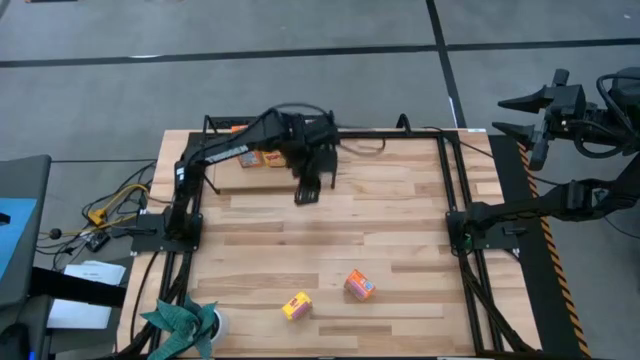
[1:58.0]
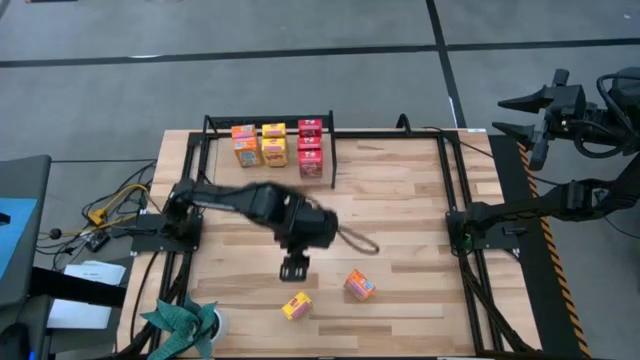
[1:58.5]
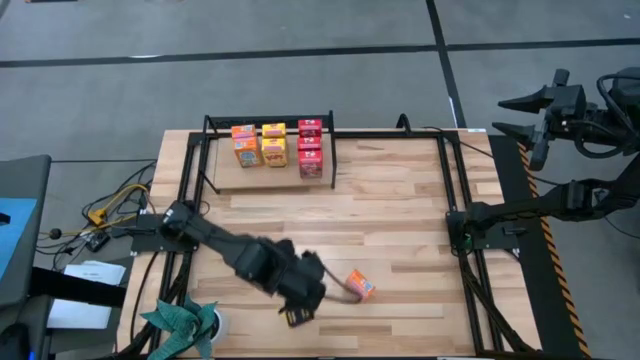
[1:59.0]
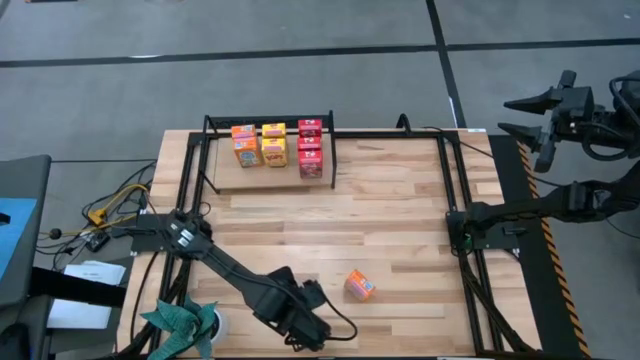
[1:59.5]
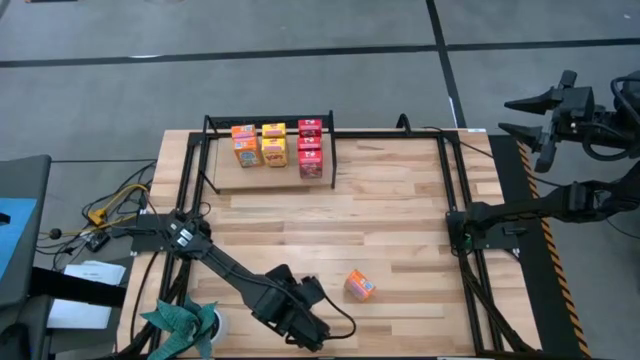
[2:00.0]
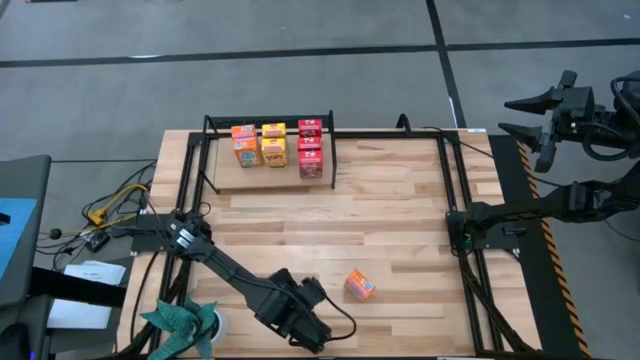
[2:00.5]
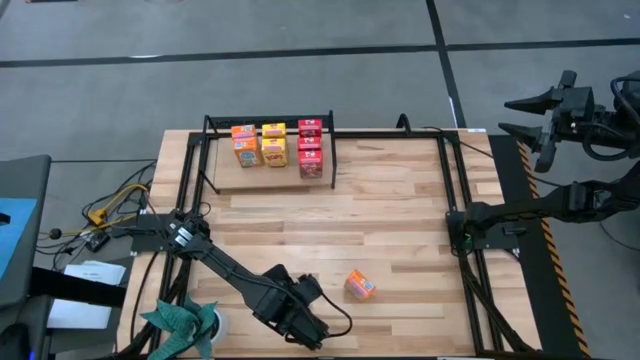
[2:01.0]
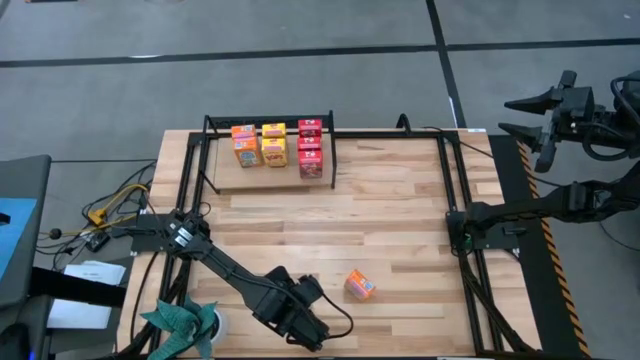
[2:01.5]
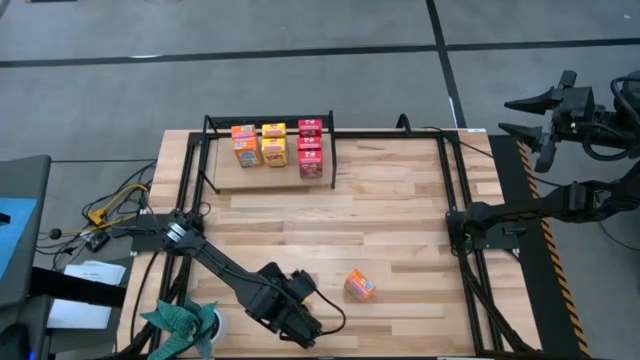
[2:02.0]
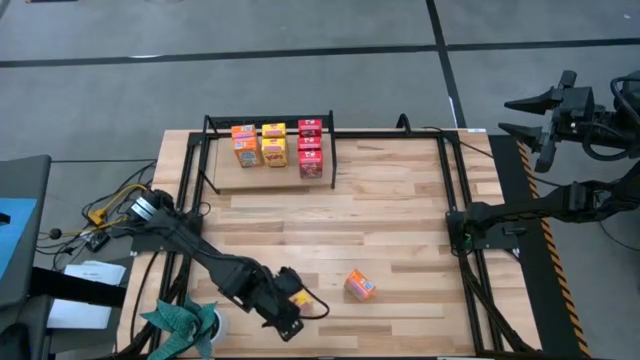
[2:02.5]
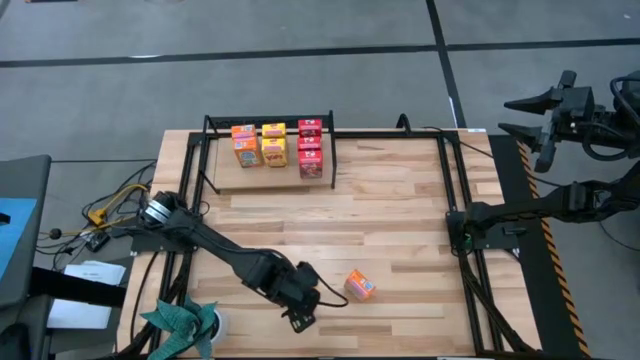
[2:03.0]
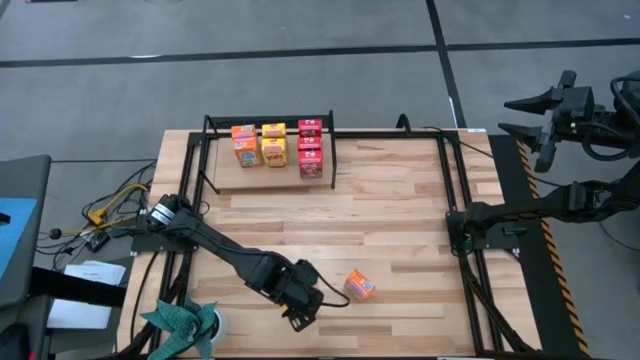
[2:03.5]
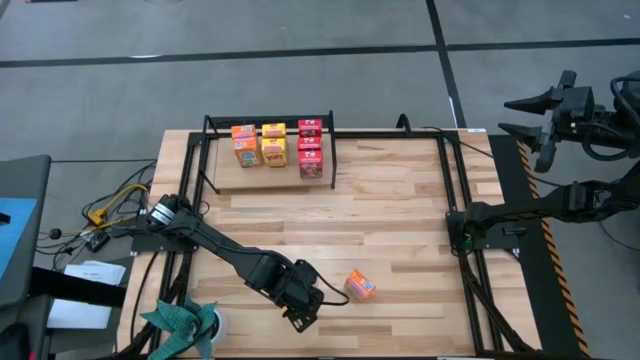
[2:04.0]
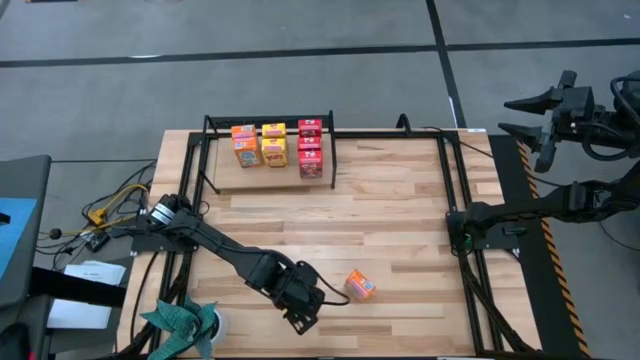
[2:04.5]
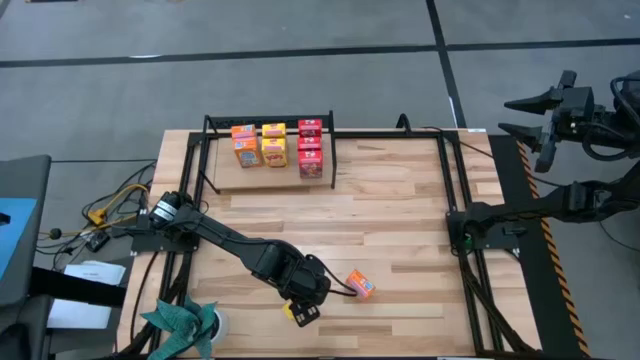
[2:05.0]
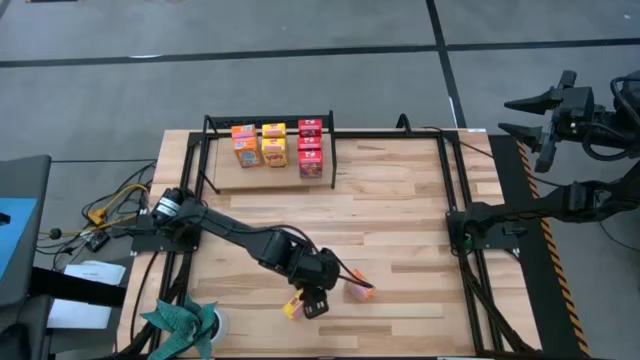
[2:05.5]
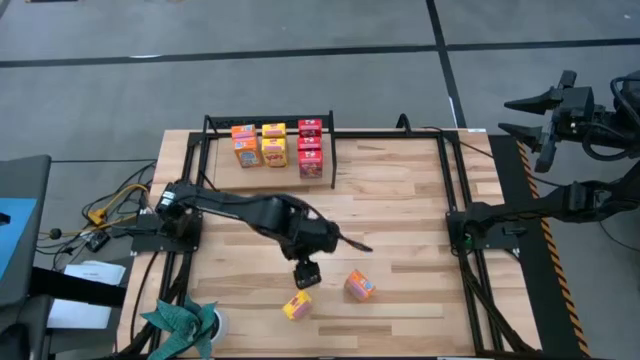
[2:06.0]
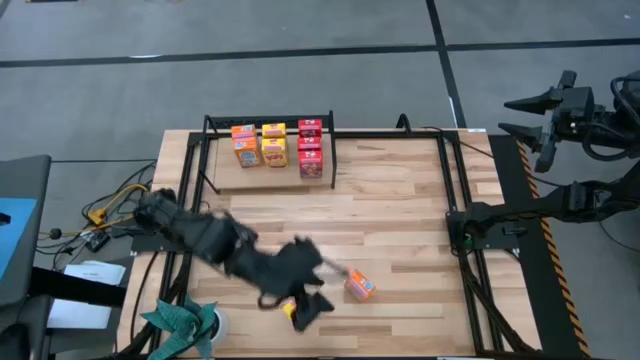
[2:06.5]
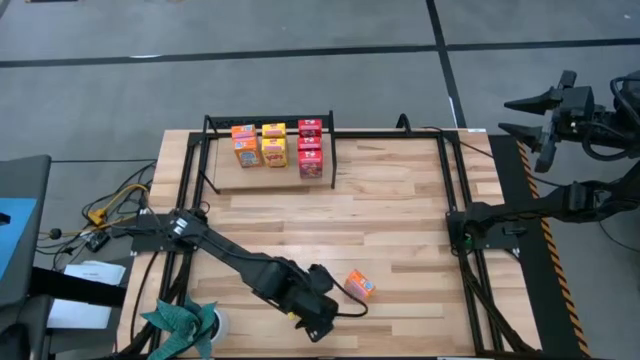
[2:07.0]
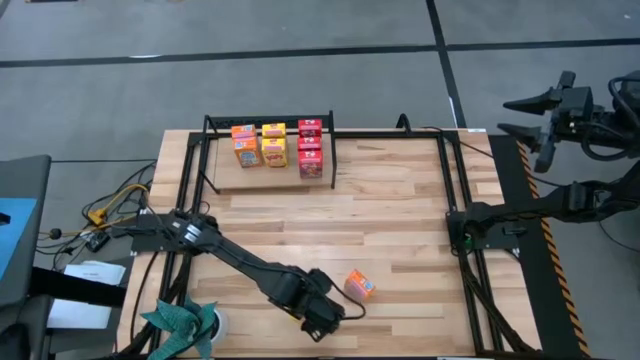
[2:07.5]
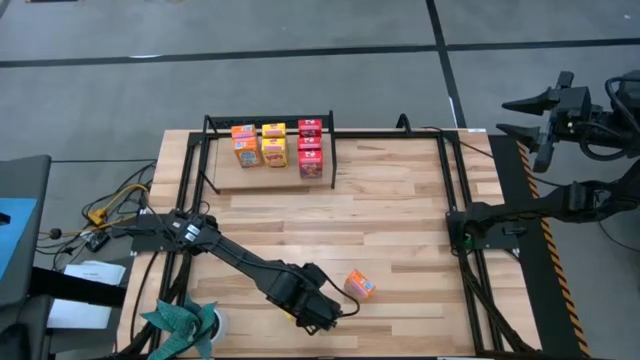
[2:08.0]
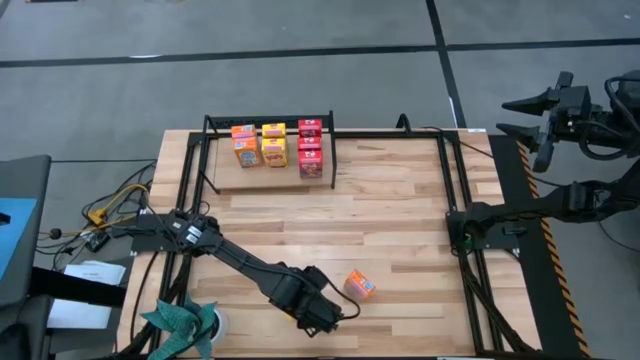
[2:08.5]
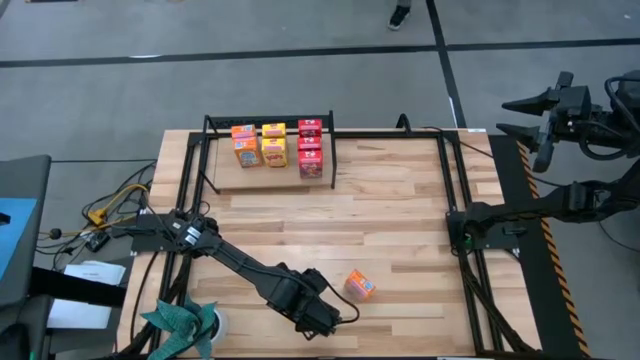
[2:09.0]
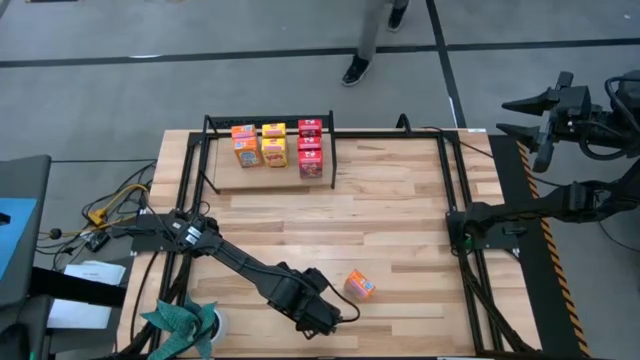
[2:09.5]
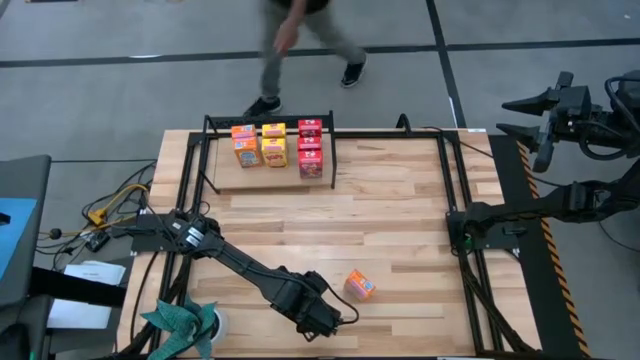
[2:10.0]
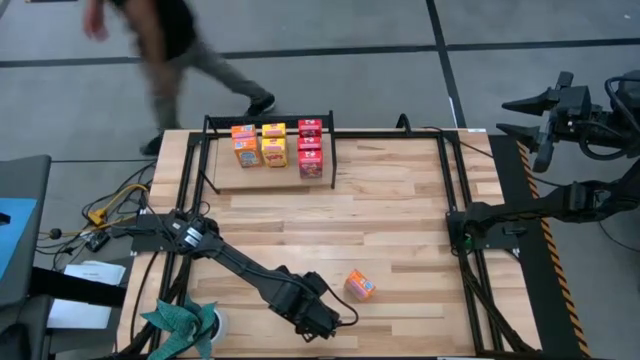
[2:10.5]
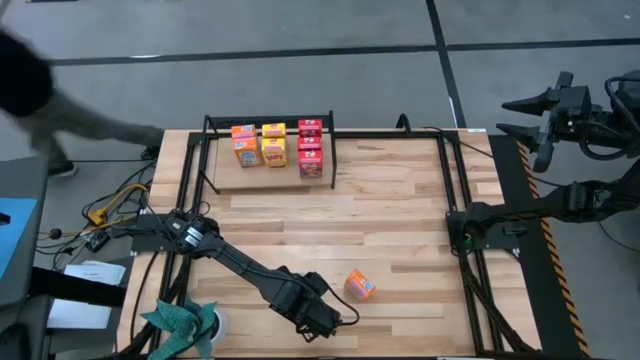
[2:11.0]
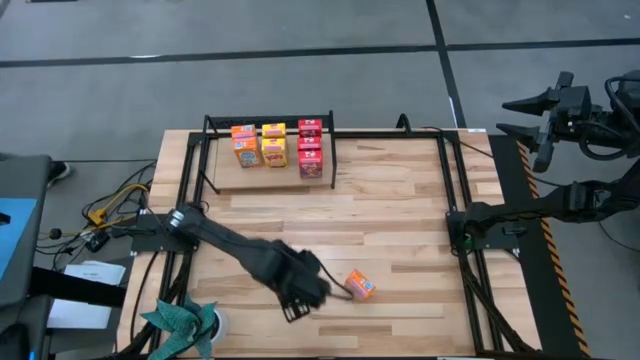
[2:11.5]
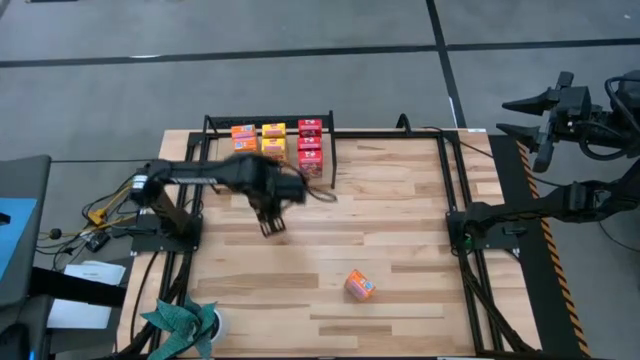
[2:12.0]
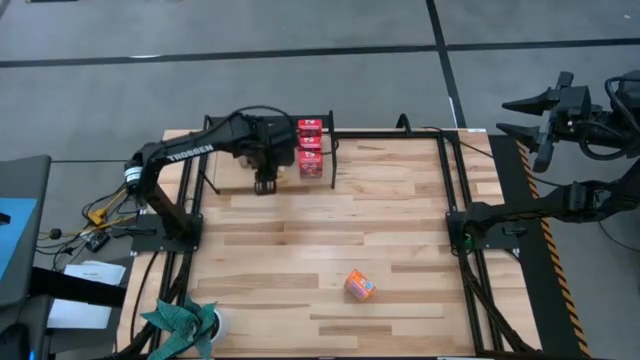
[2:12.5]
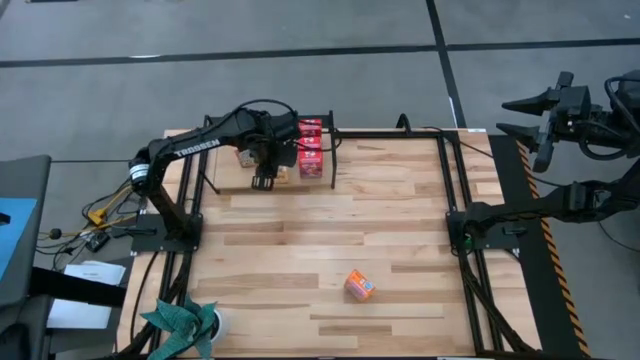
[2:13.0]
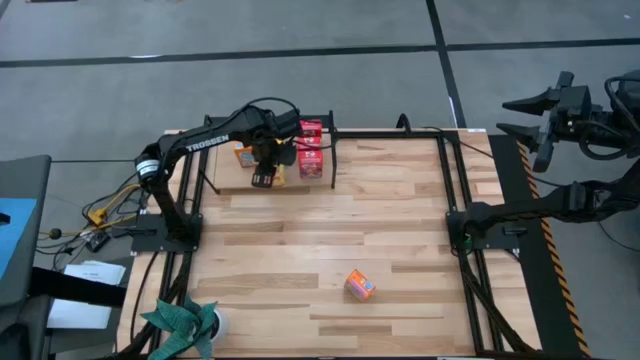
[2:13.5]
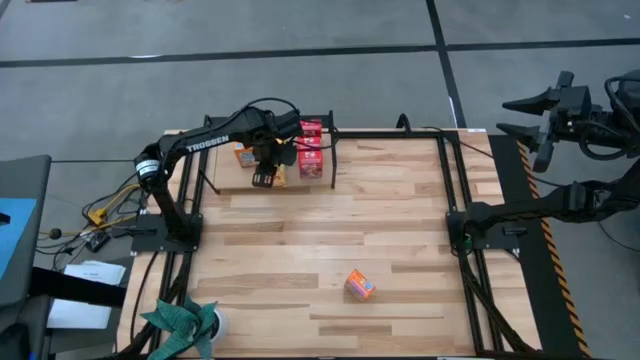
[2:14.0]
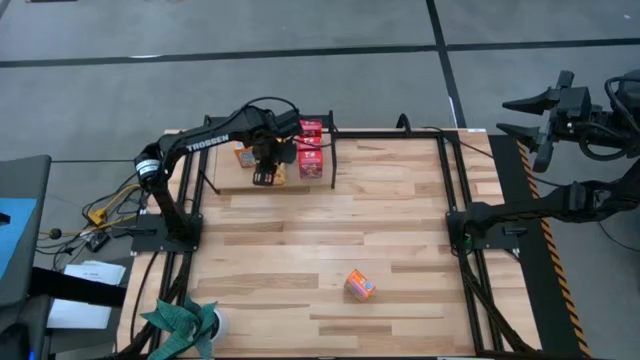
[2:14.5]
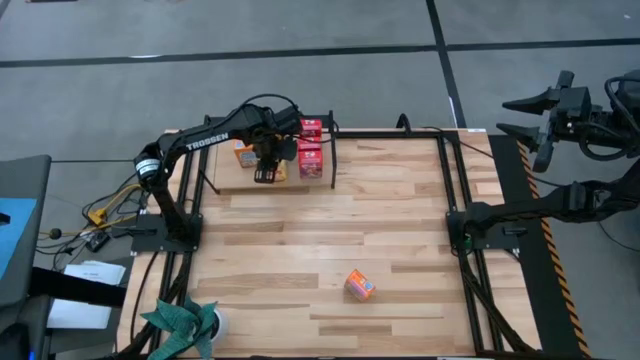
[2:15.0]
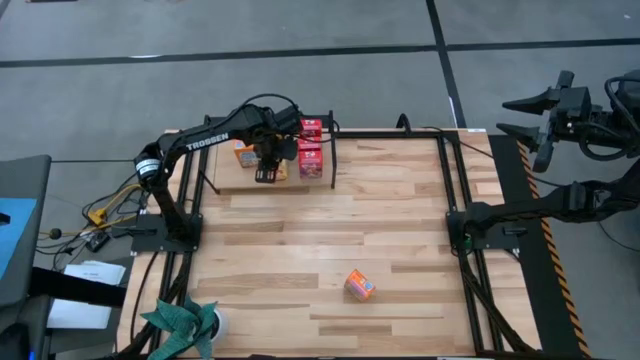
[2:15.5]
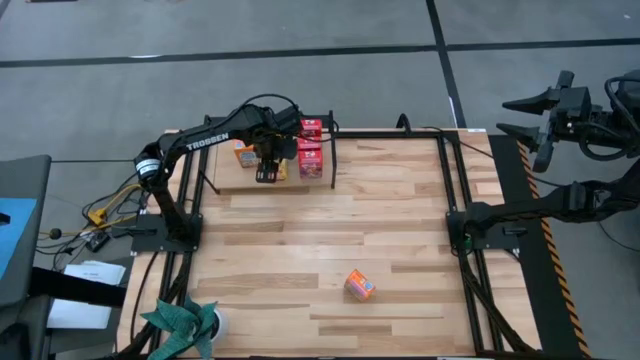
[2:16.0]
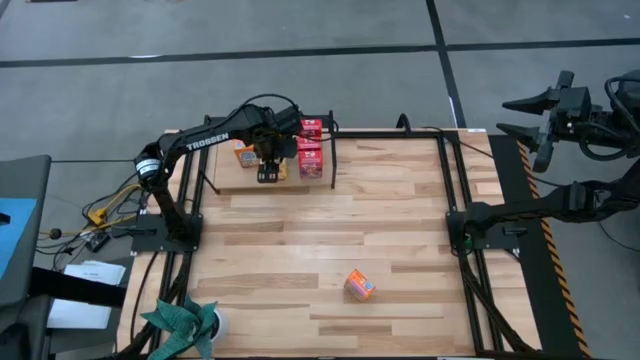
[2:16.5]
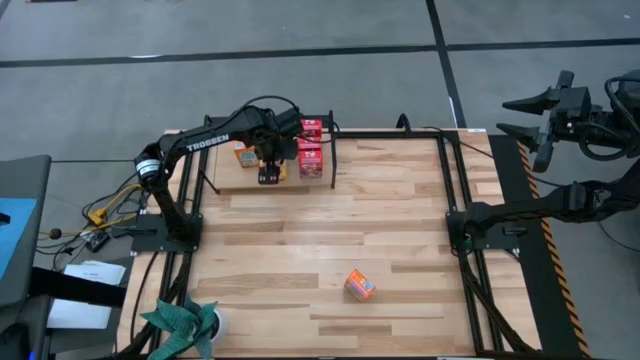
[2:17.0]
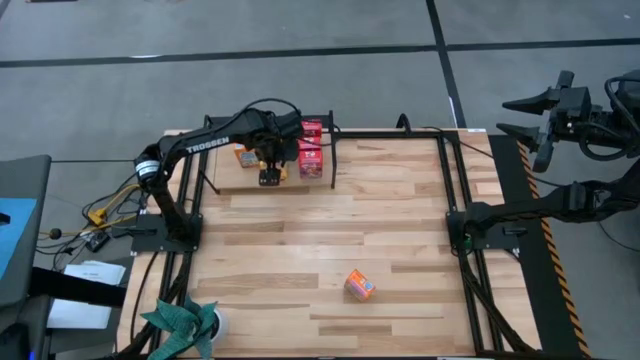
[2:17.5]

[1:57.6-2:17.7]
Task: Stack cereal on shelf
Put the yellow cereal box on the shelf aligned with the other yellow cereal box

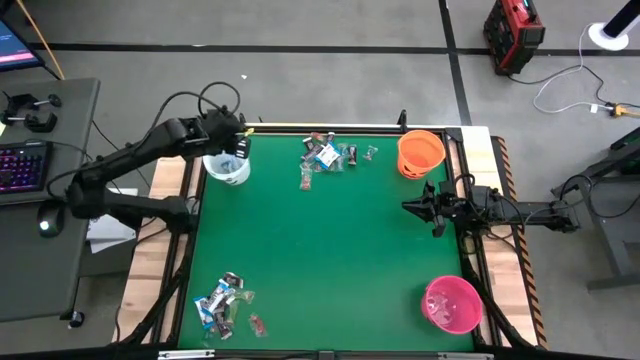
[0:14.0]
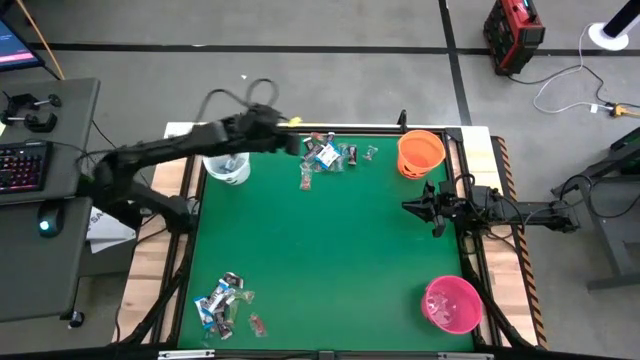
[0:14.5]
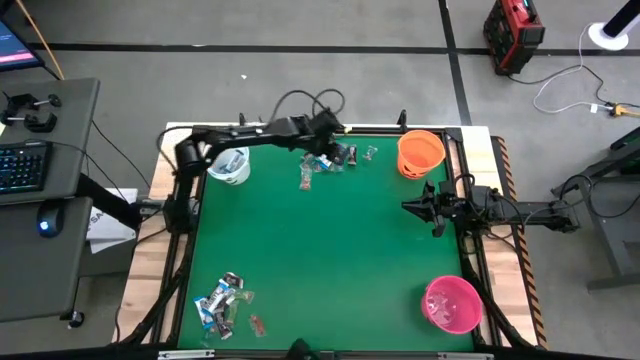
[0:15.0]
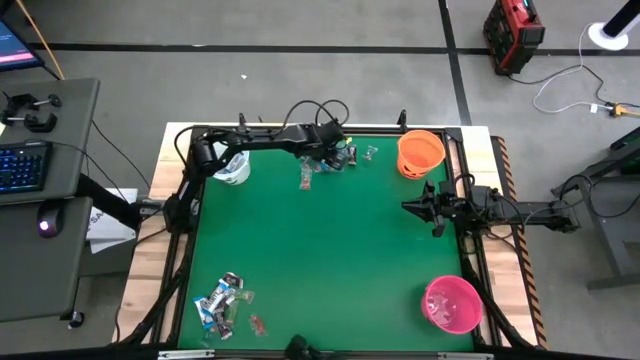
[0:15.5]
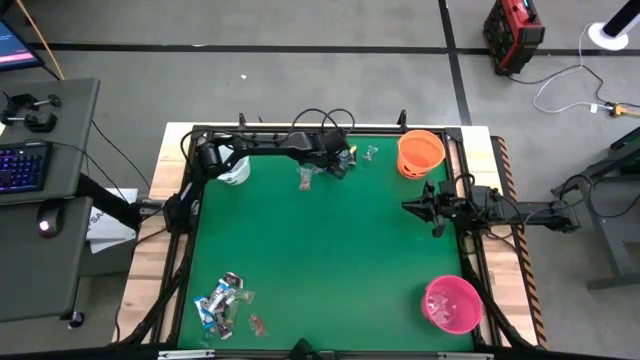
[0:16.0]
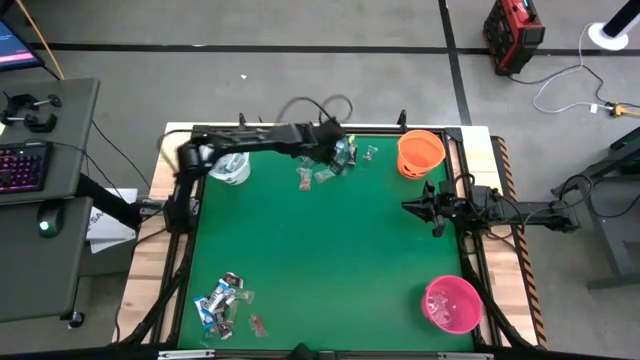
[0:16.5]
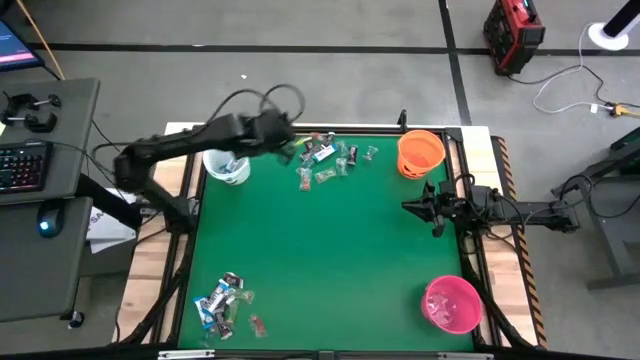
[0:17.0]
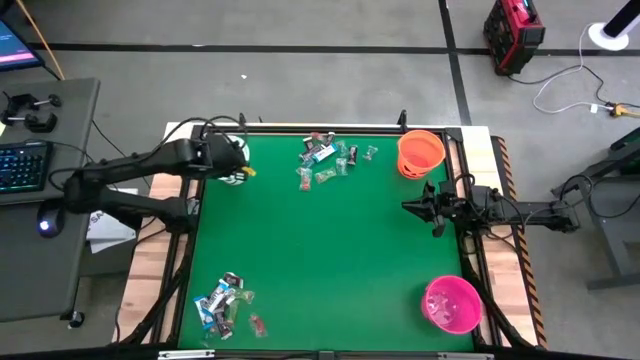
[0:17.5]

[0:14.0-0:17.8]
Task: Sort candy by brand, put in halloween buckets
Put the white chocolate bar into the white bucket
